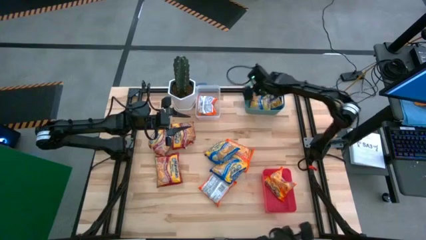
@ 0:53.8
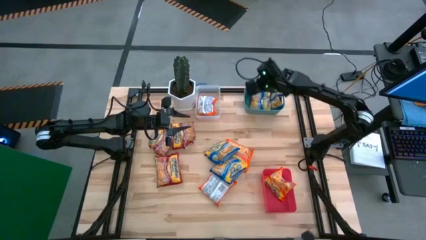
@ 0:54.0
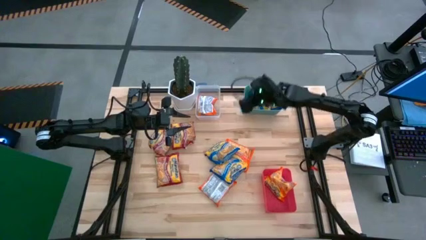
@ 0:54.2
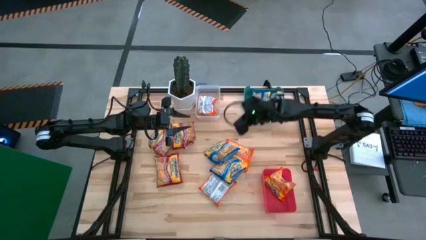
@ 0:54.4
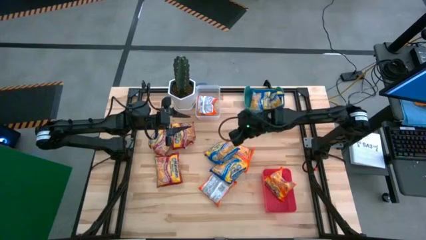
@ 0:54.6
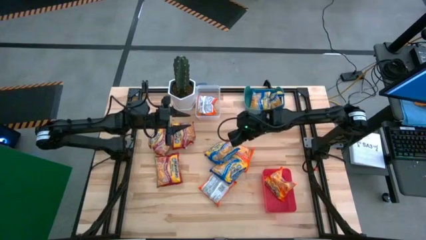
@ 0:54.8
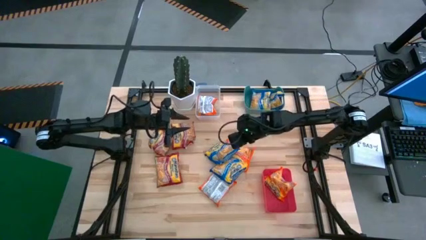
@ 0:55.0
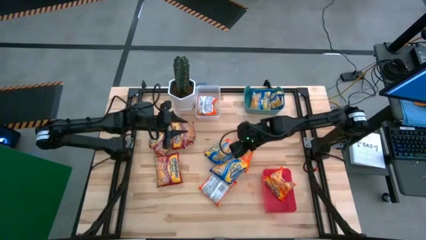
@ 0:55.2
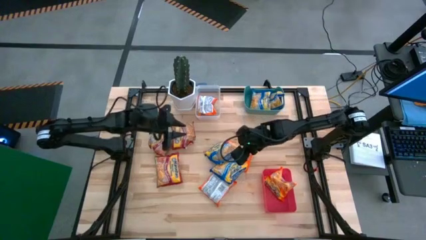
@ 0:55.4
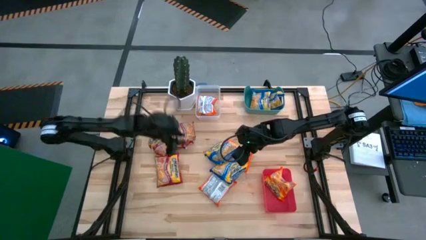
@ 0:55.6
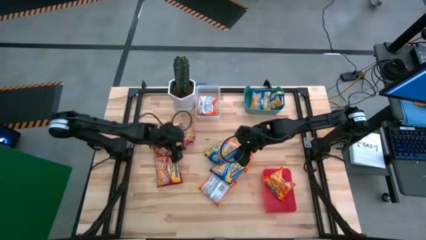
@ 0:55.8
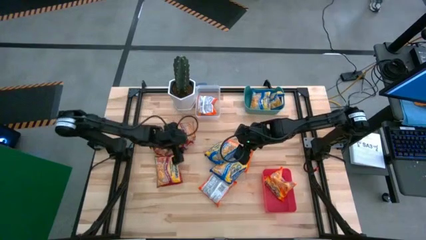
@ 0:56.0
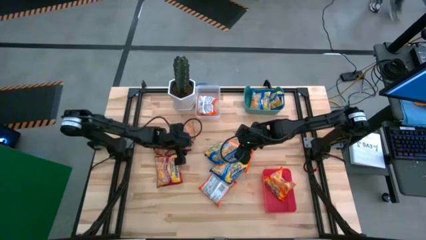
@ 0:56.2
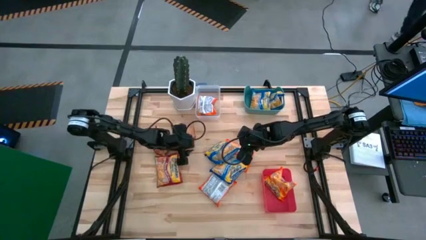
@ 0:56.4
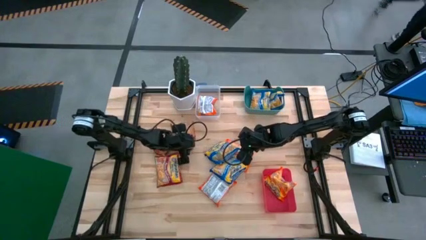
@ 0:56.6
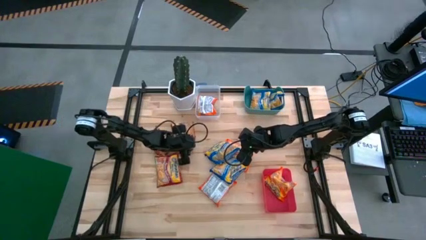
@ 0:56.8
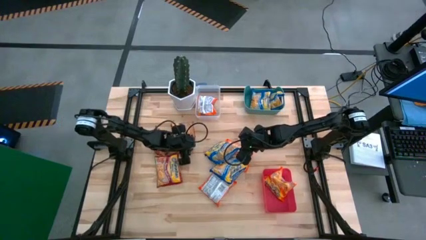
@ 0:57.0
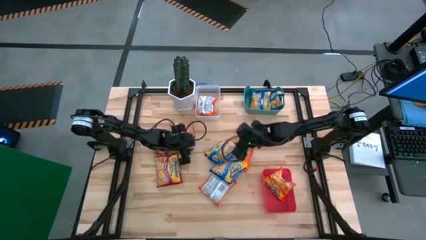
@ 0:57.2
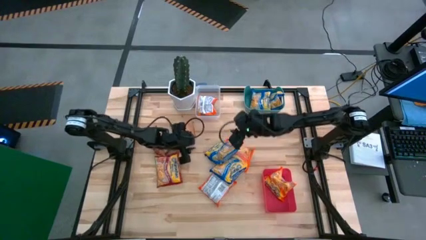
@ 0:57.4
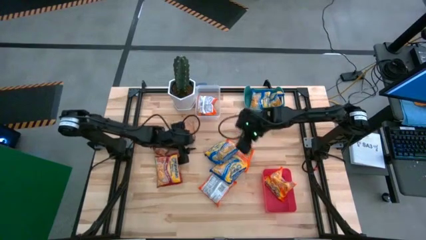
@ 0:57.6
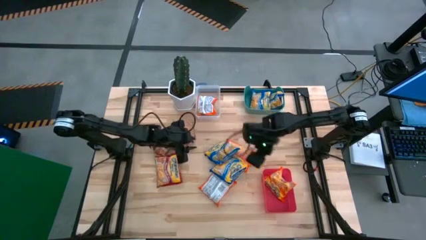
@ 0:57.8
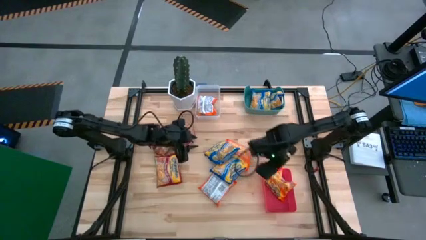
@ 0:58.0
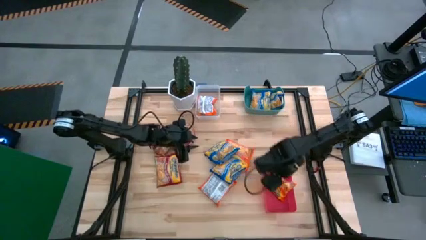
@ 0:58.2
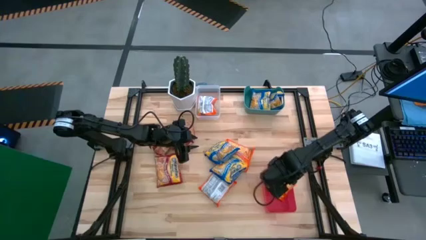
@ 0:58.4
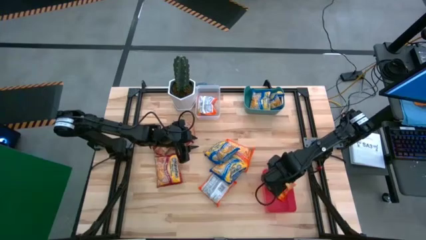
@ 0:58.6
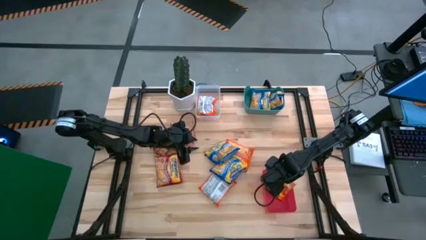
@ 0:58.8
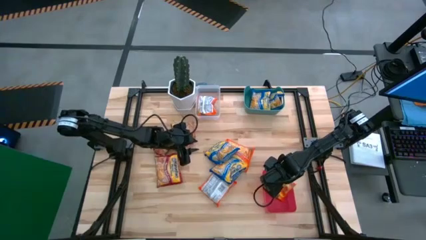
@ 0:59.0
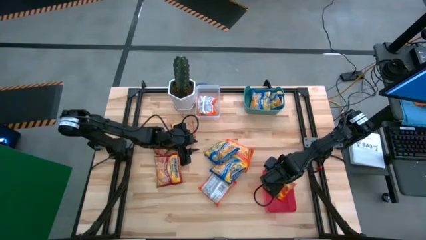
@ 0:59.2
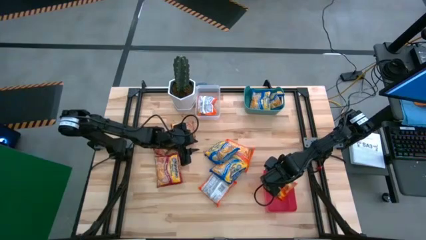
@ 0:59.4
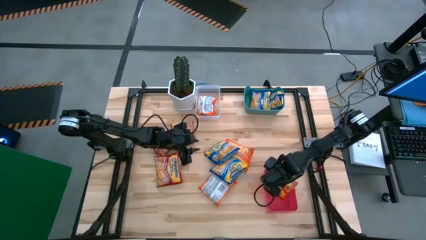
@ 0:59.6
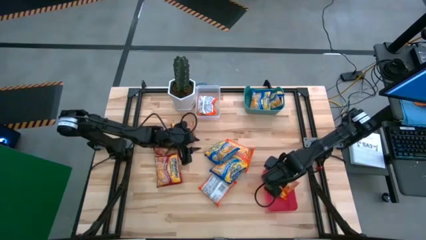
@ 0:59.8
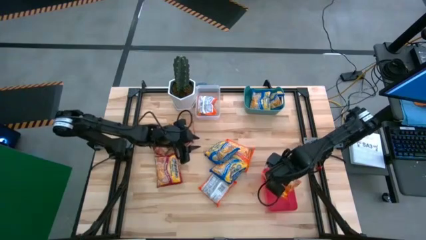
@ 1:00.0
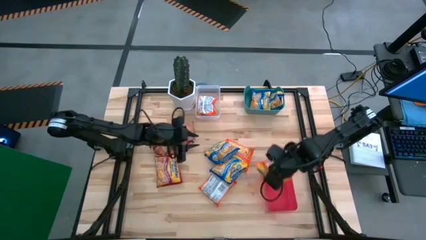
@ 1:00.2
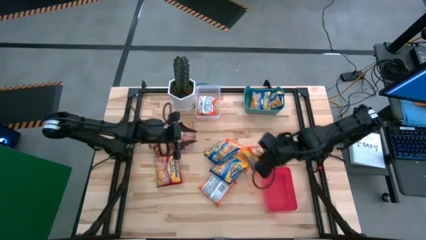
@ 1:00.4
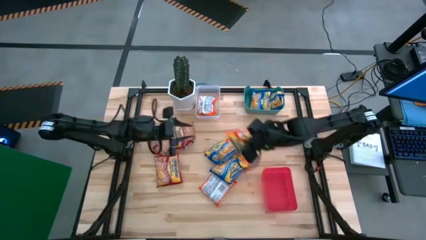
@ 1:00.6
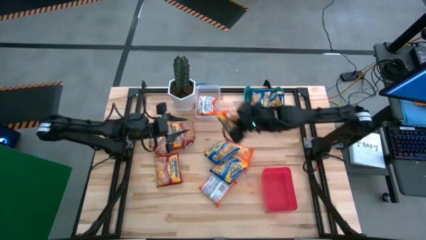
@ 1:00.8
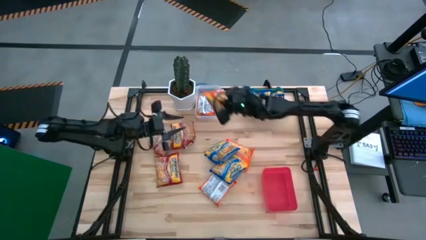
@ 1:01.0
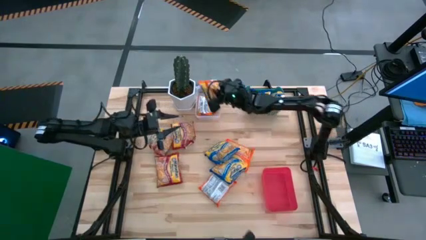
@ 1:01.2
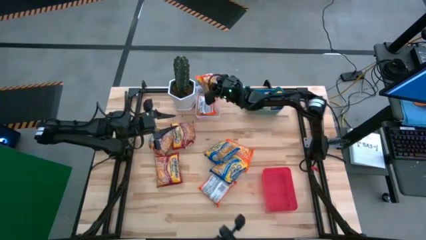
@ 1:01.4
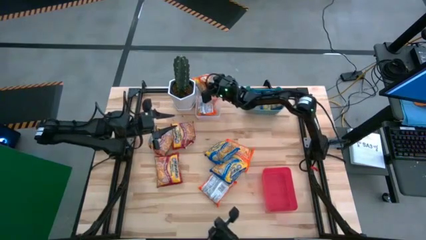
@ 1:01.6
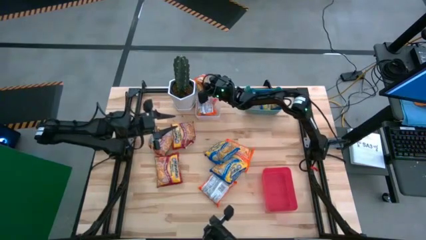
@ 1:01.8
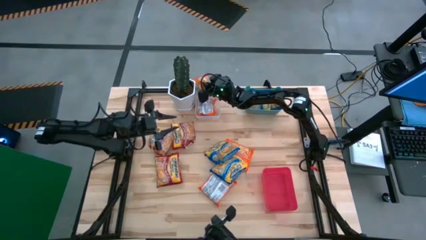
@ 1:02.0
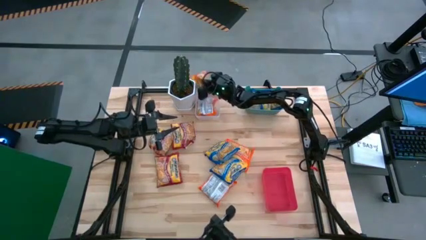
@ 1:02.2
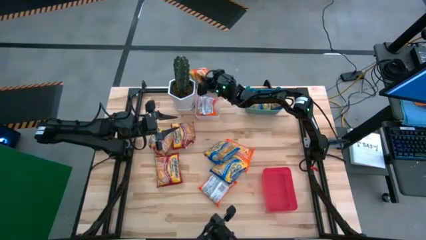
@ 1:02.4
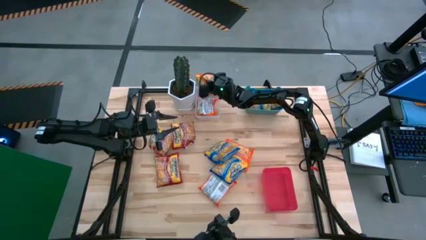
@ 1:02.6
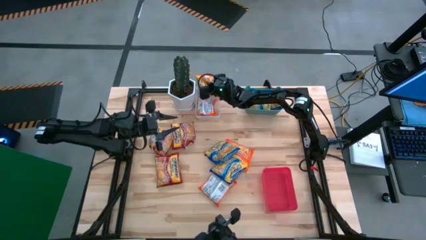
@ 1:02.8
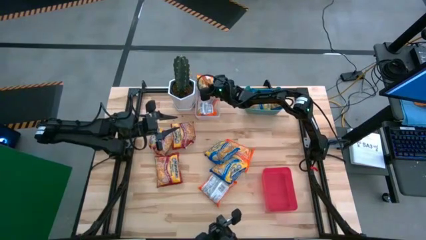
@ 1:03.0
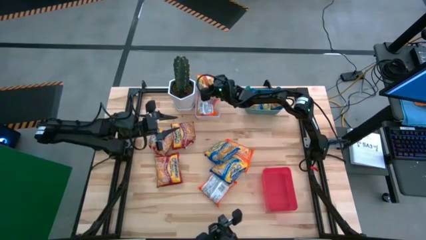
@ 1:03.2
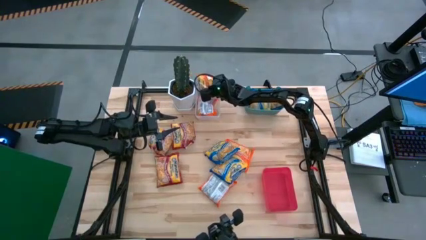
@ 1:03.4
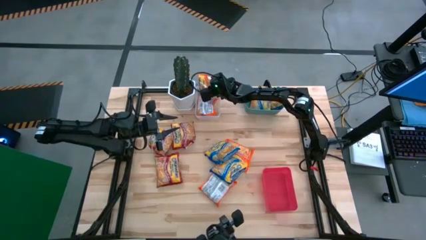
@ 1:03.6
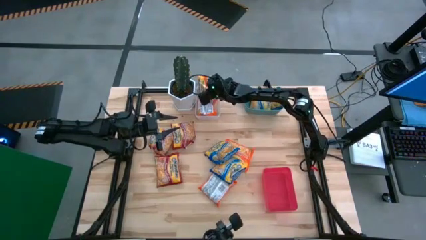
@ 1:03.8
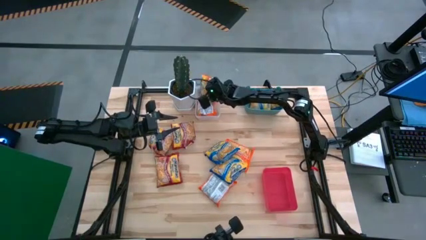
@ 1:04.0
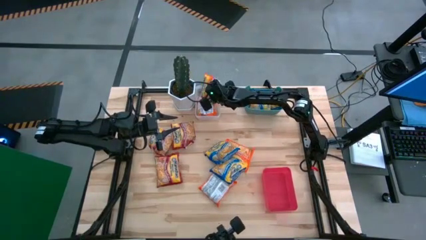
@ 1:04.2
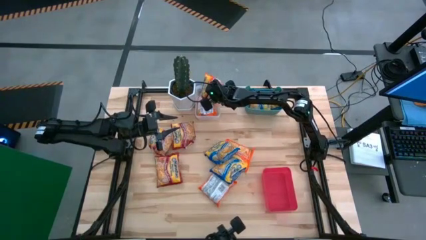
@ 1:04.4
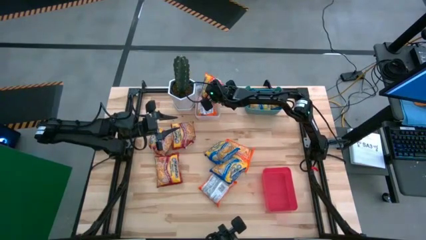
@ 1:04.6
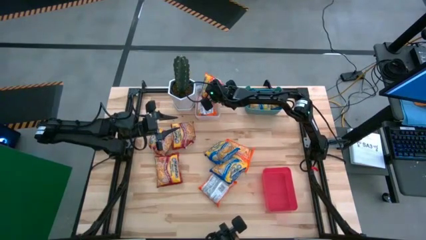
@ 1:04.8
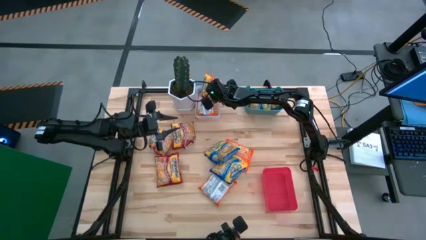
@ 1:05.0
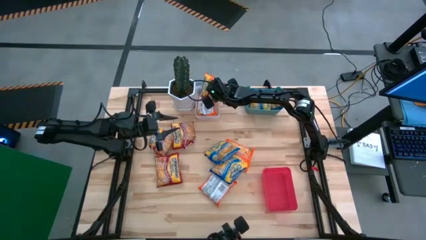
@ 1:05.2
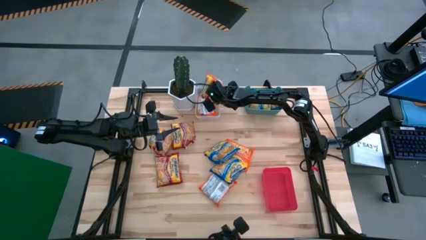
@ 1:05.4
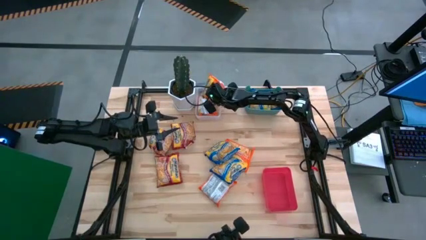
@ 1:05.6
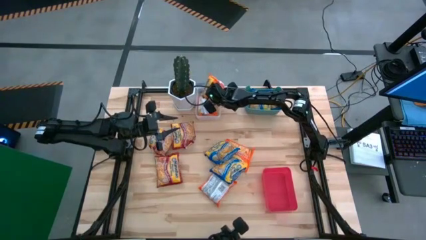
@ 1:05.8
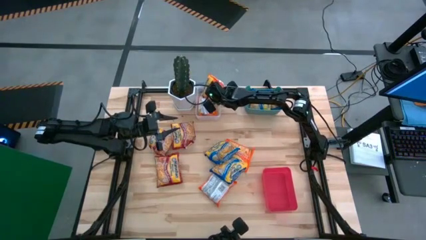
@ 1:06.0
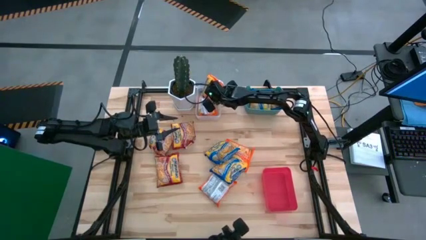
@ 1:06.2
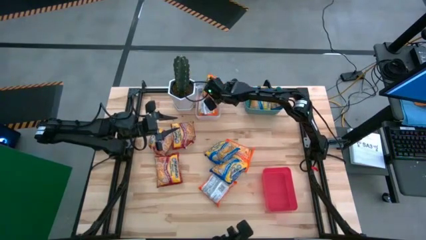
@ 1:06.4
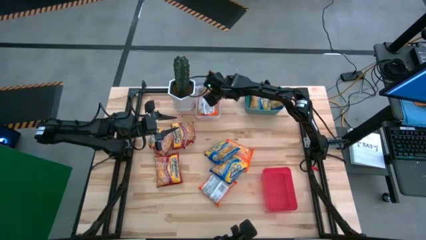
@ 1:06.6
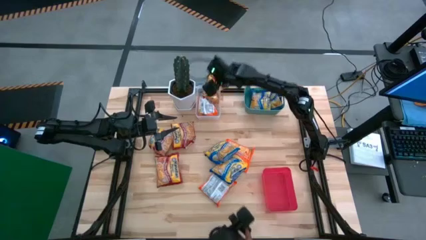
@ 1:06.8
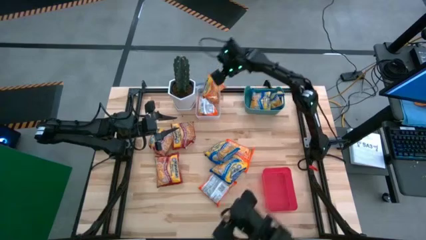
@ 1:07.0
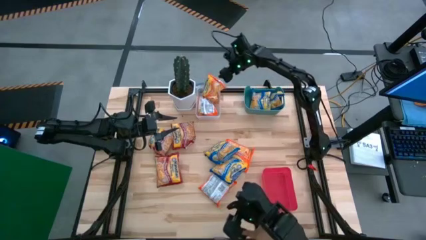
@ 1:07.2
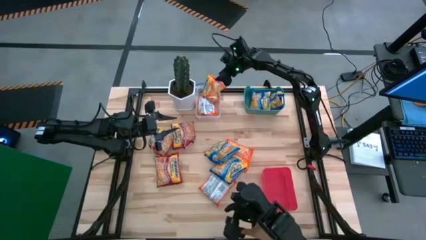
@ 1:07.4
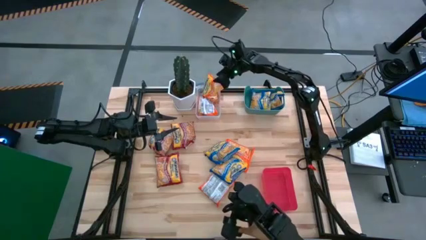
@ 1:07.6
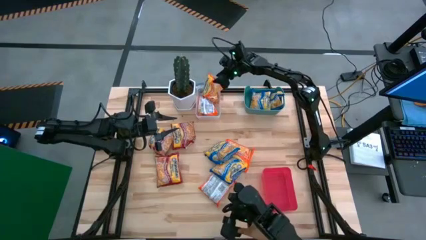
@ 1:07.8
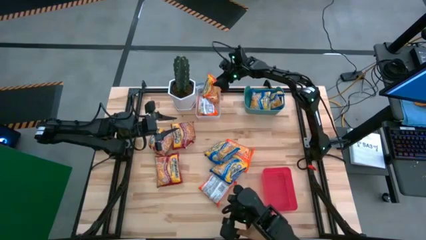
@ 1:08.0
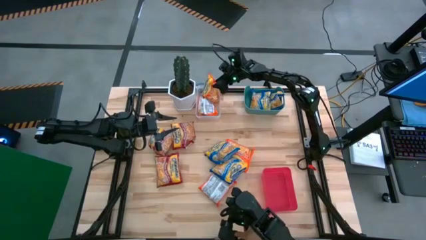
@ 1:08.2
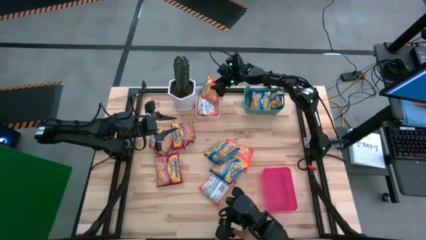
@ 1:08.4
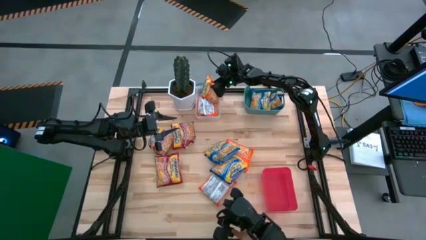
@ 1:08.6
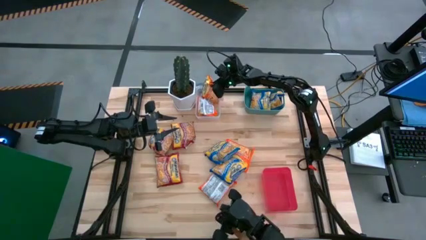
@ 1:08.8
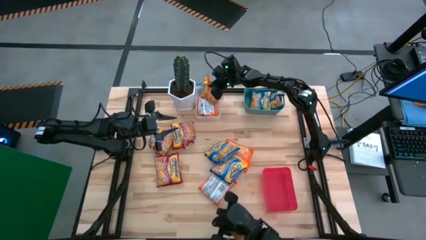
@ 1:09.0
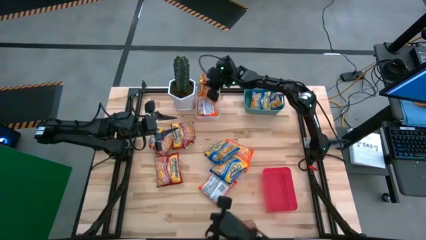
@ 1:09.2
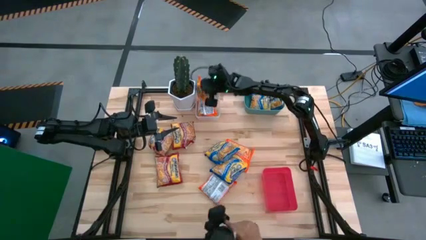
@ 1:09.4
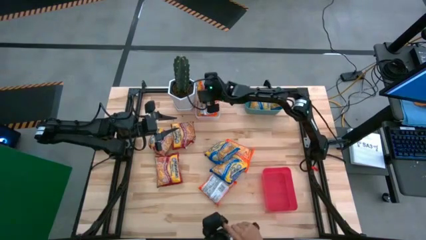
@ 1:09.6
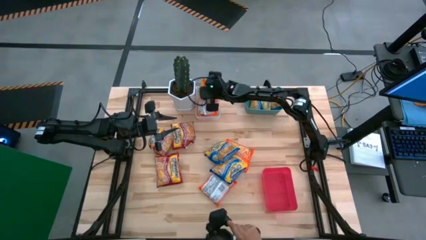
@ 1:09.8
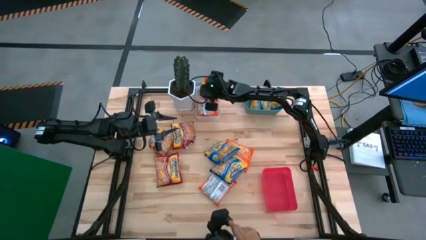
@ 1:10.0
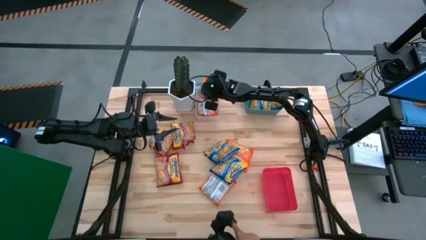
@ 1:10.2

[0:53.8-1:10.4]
Task: Sort Maruchan noodles
Put the orange noodle pack into the transparent bin
